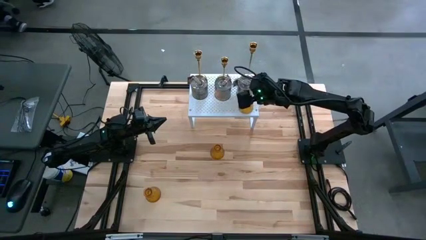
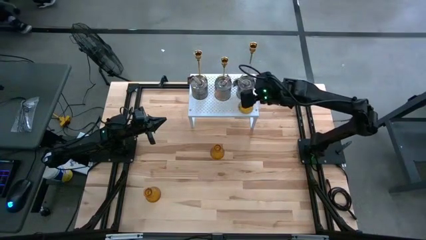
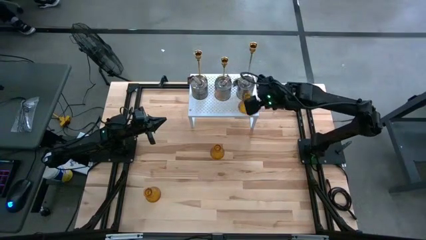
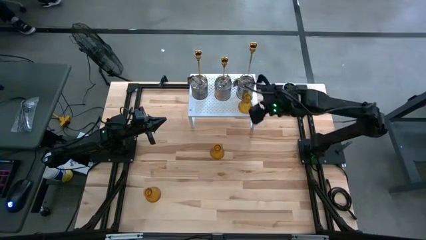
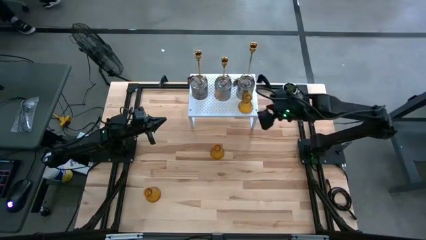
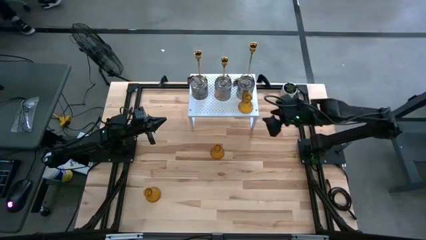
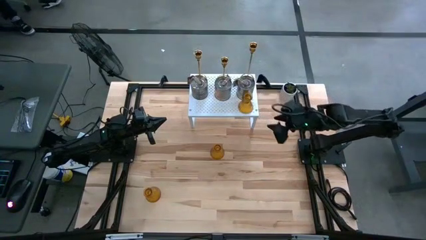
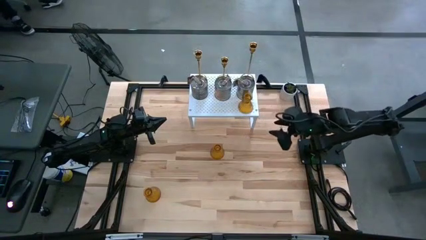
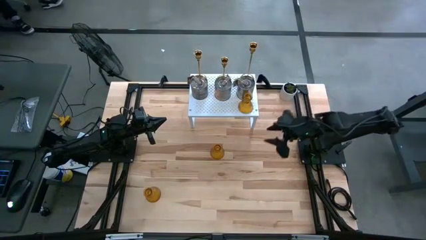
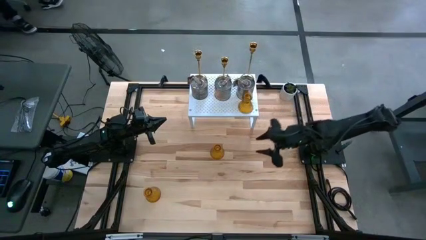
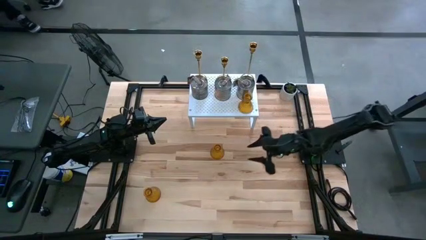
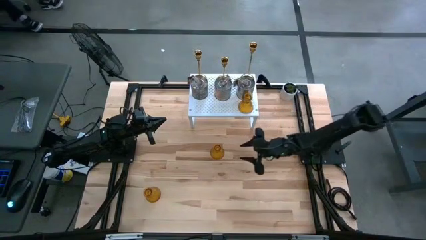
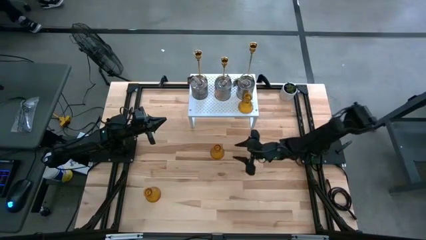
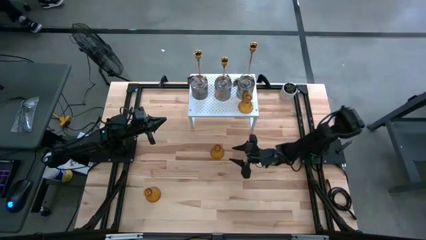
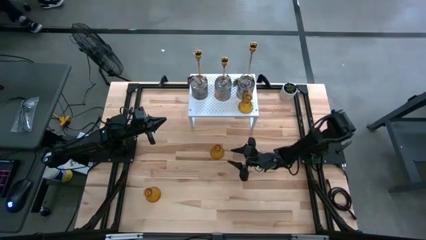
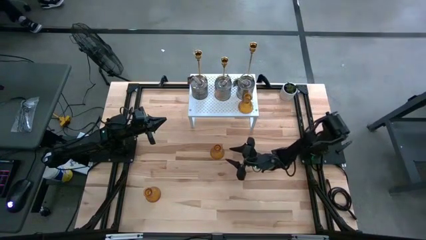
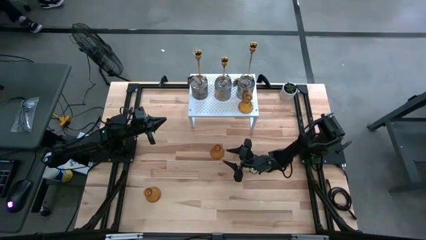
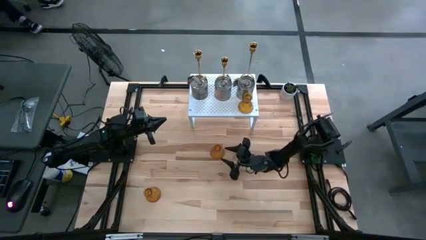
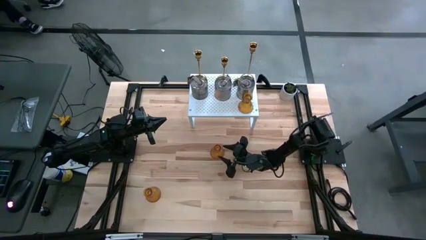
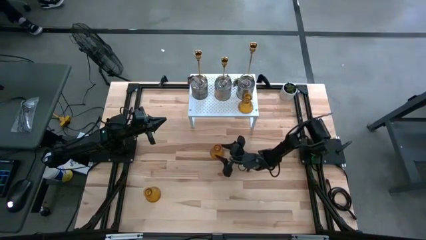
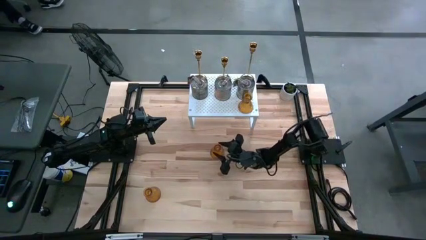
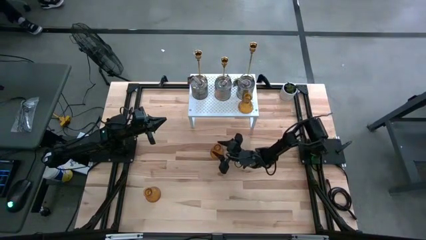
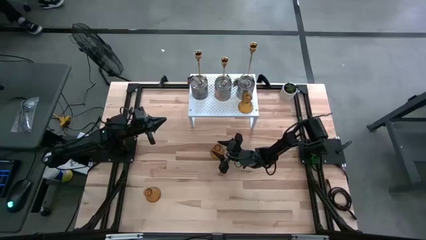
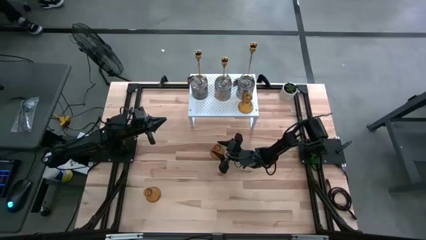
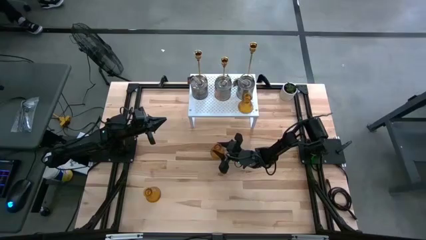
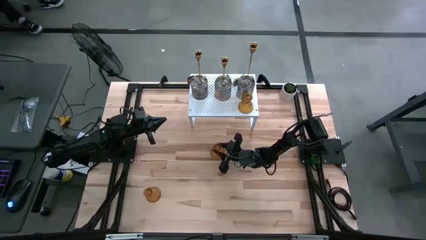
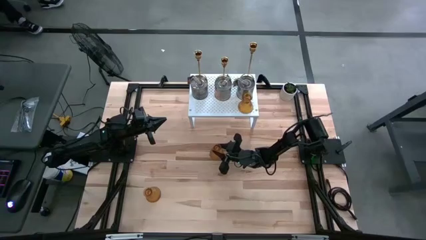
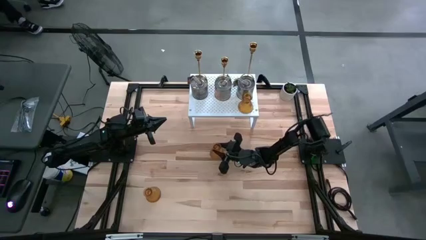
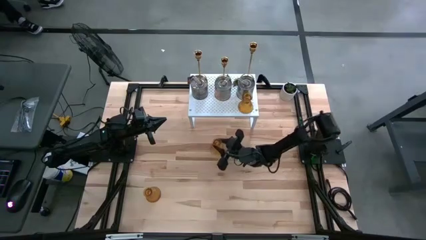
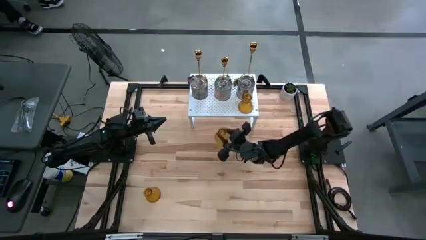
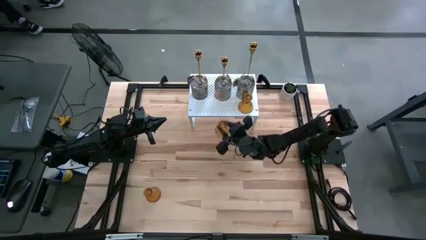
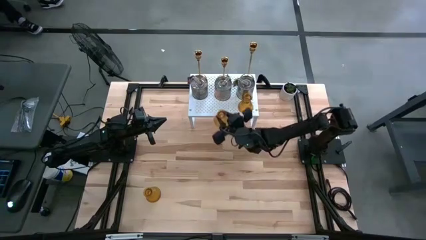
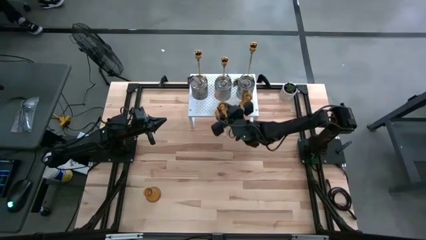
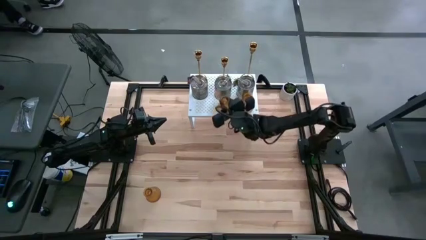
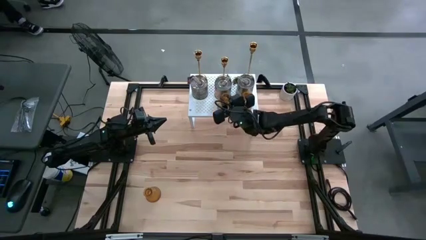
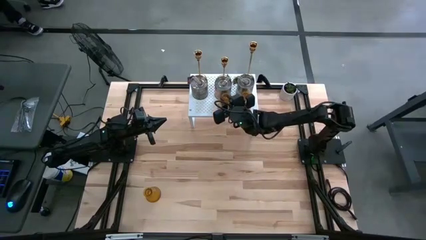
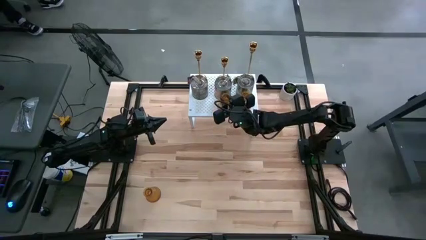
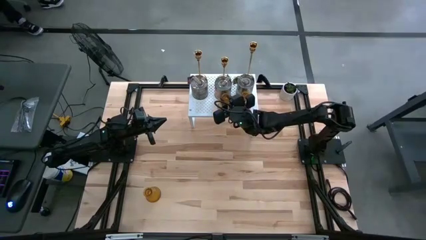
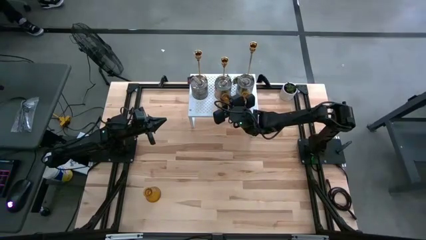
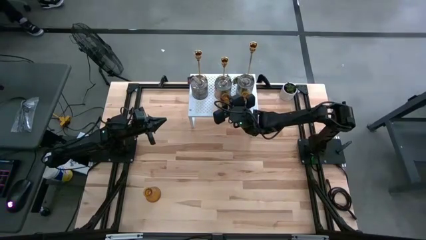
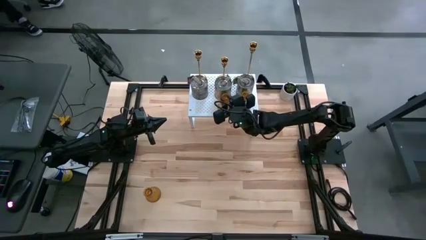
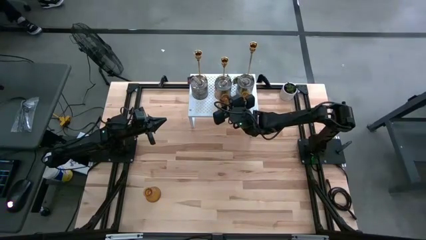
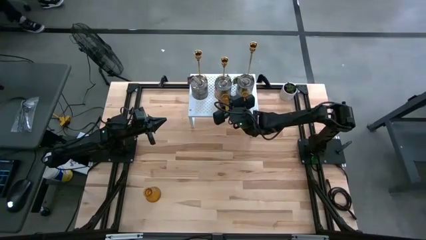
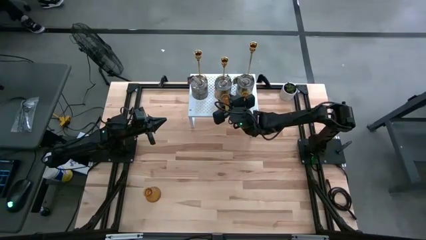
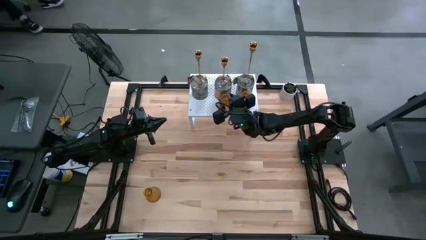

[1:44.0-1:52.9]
Task: Pick & Place candle stick holders
Put the top brown glass candle holder on the shelf

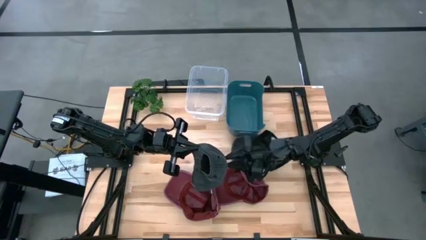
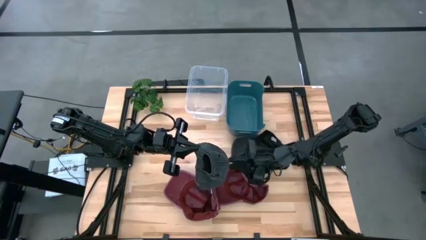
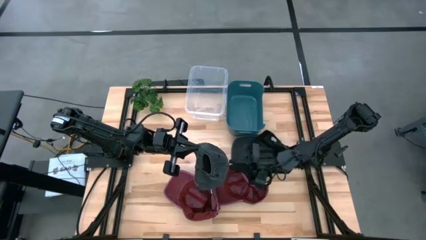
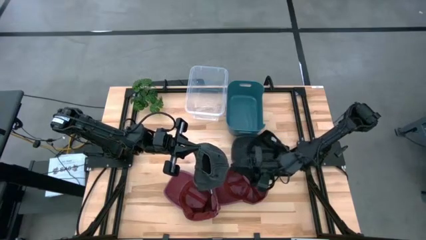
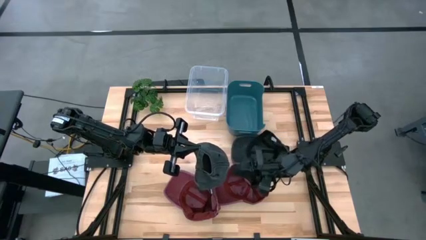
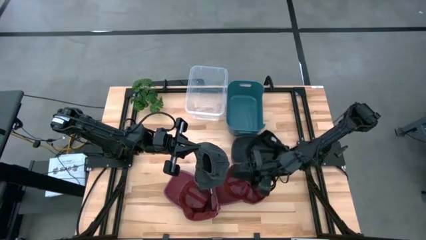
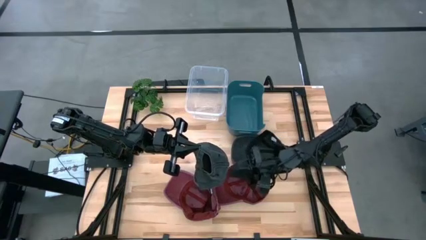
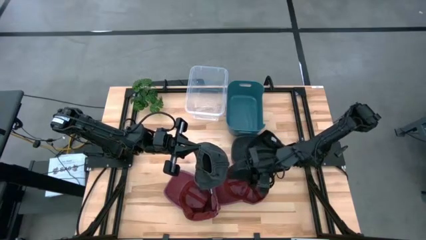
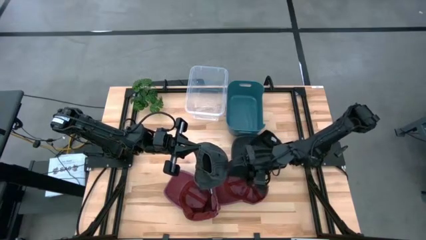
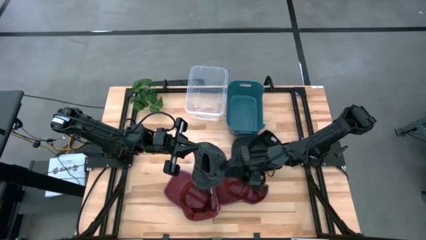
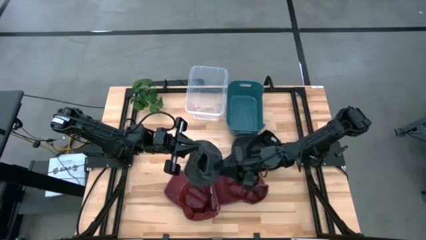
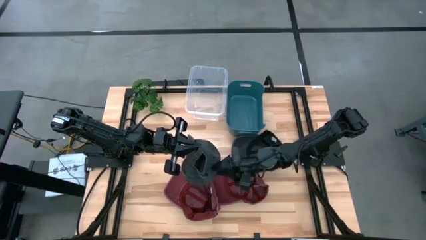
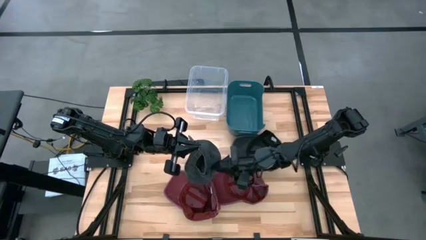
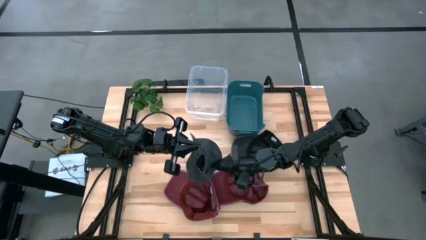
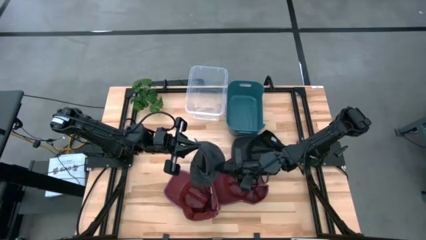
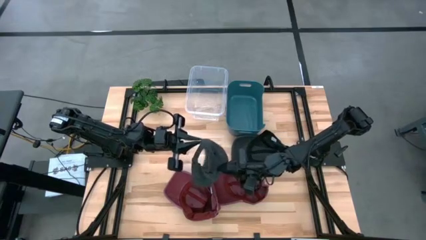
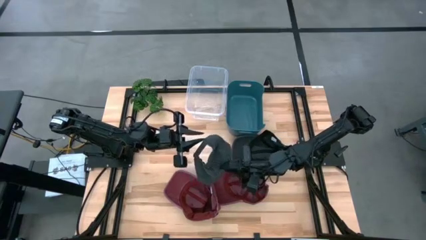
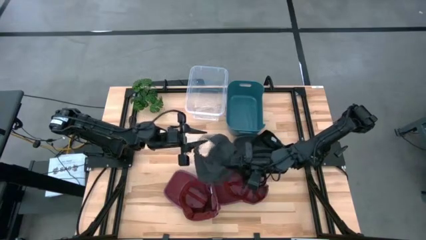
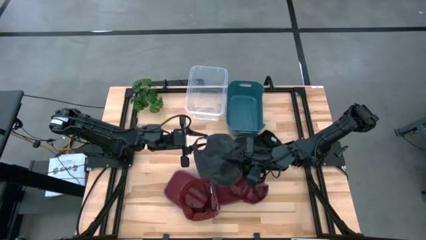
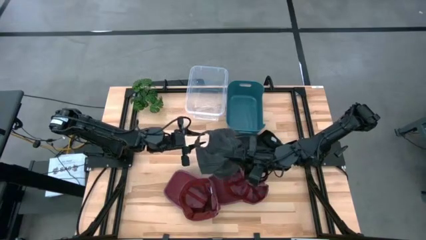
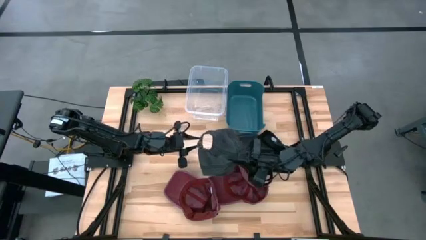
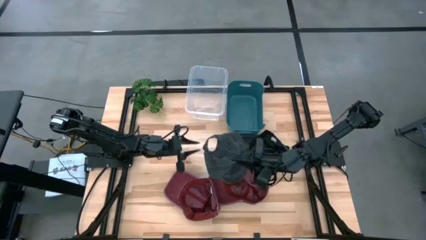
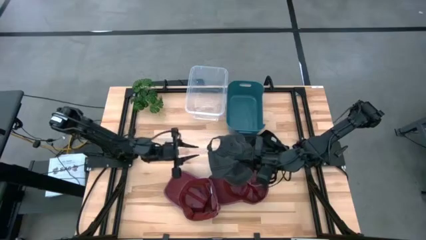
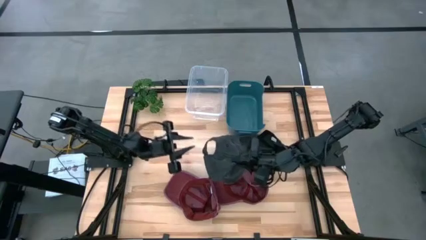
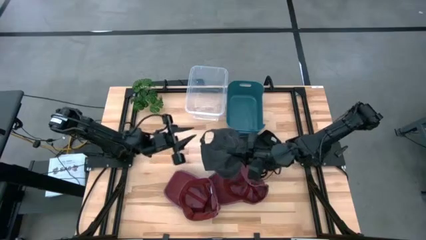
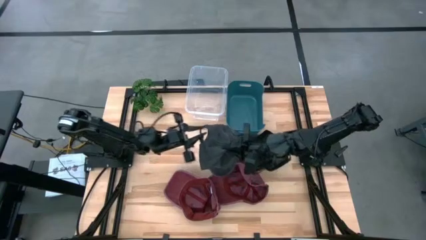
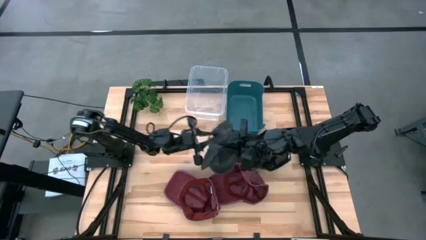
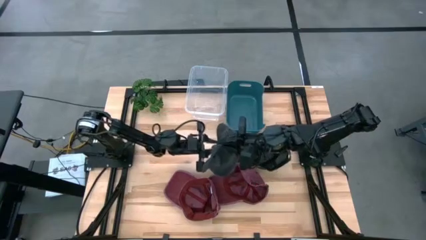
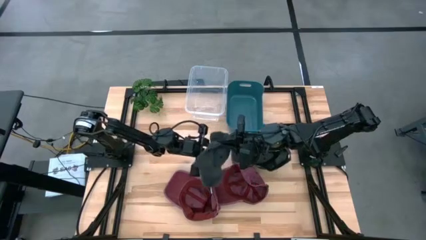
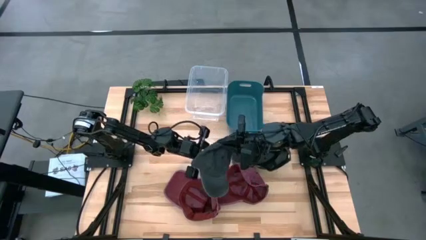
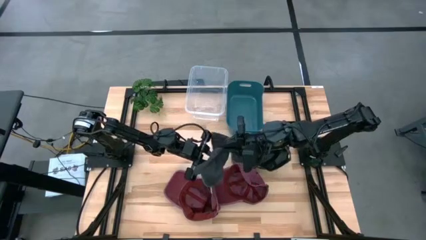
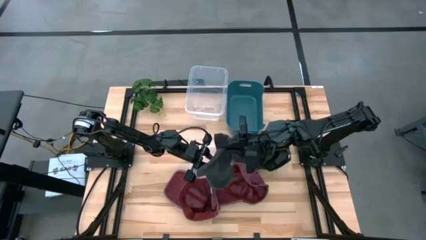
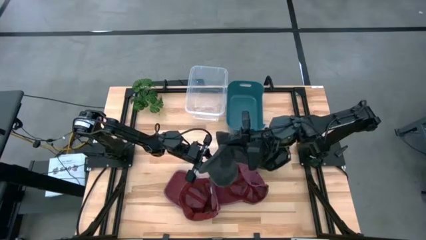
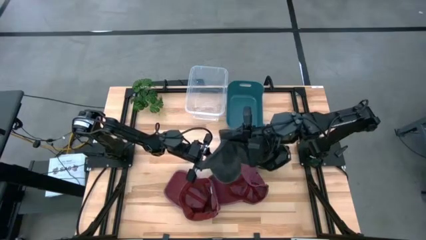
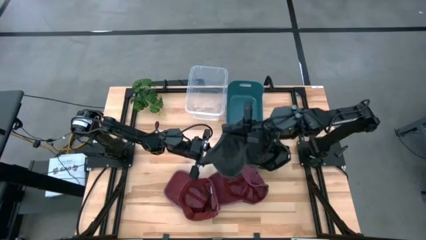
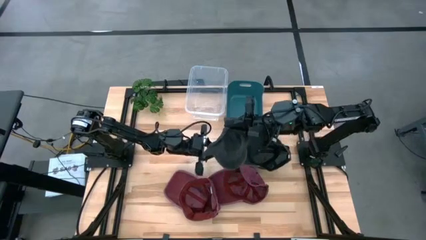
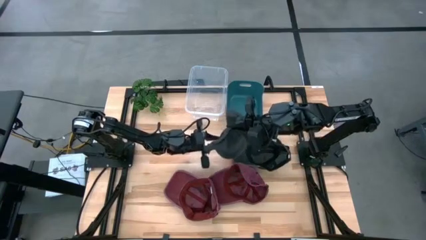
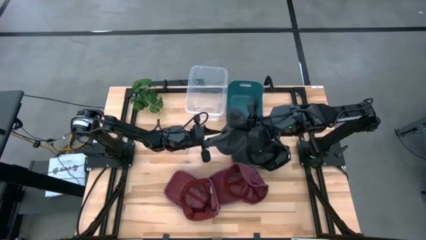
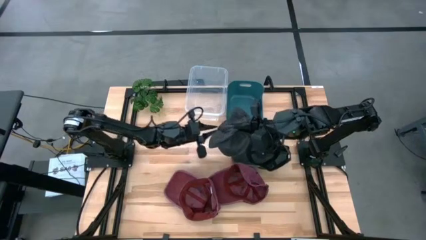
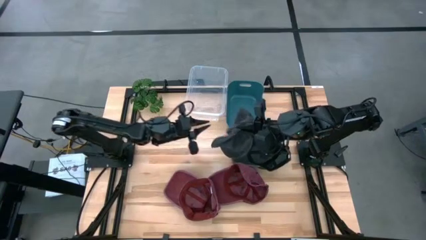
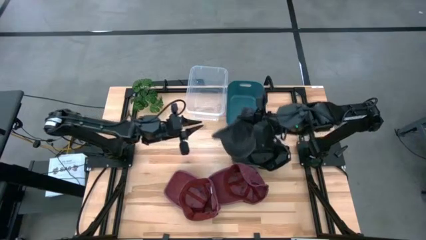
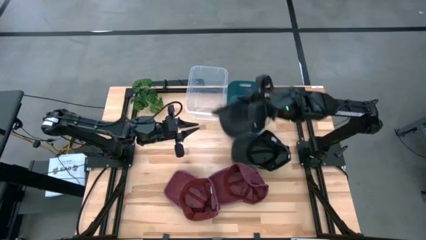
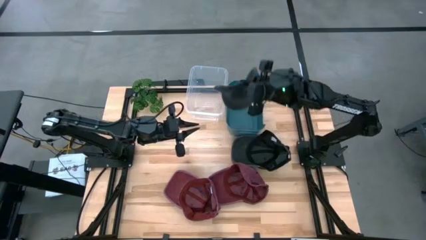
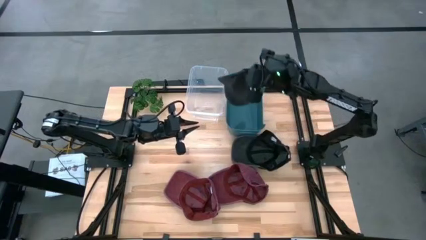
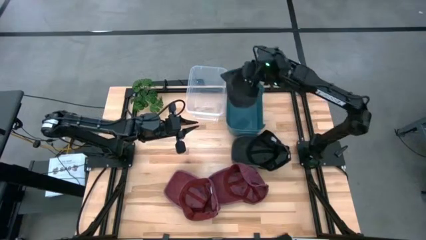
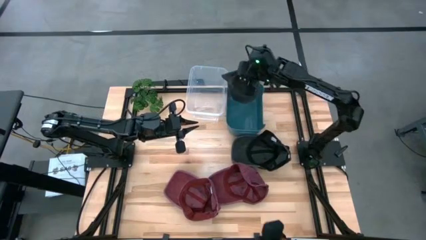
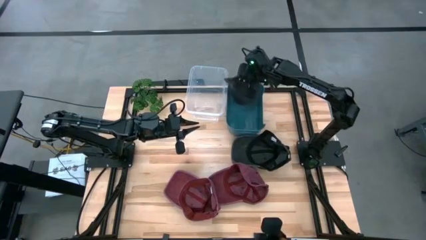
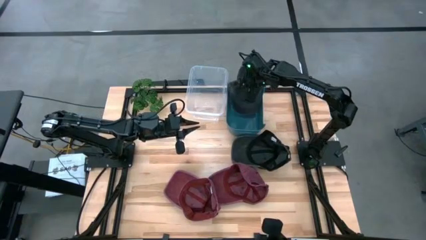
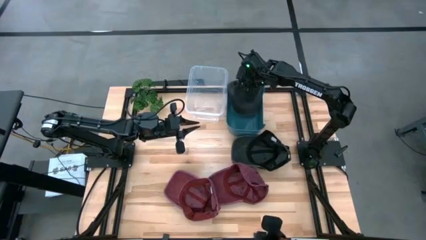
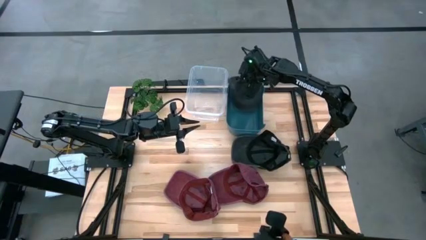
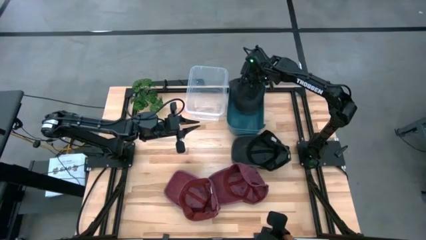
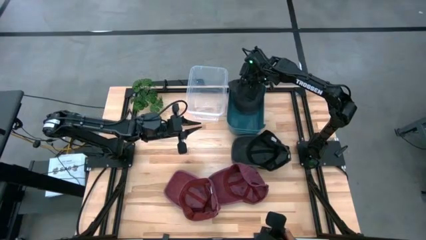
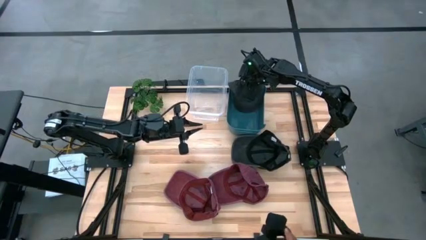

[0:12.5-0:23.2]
Task: Pick & Place hat
Put the left black cap into the blue bin
